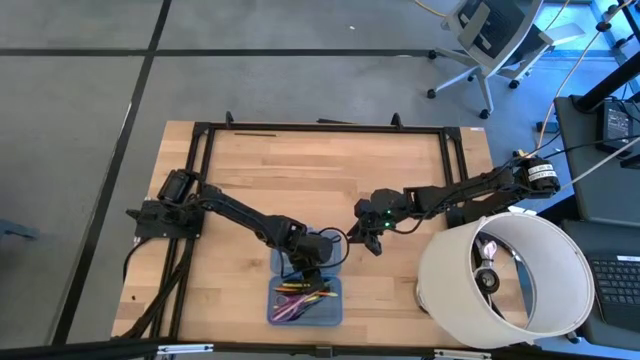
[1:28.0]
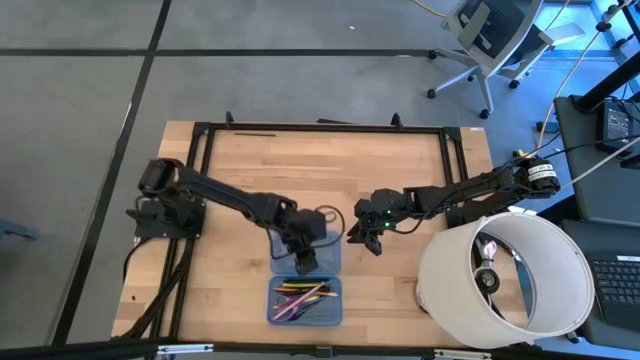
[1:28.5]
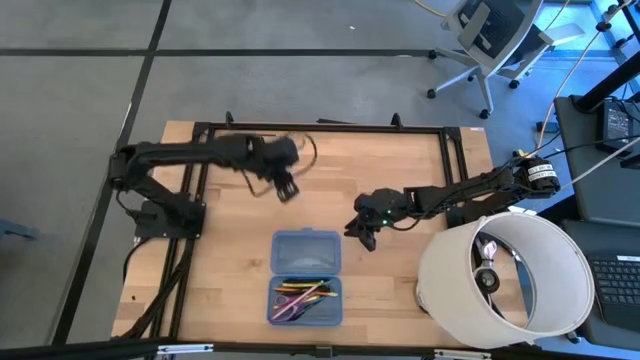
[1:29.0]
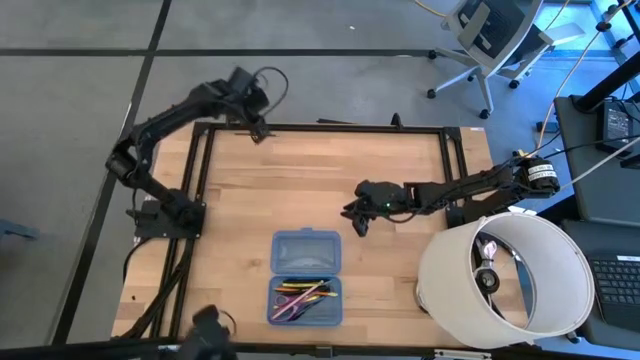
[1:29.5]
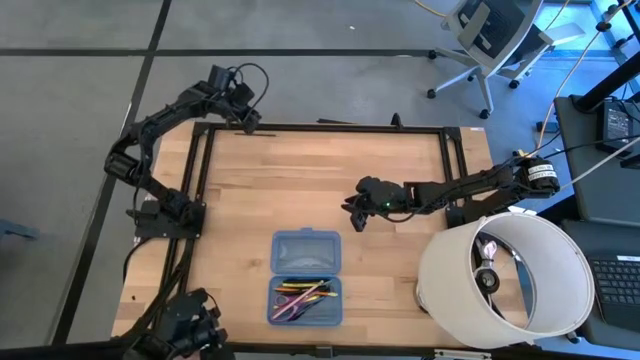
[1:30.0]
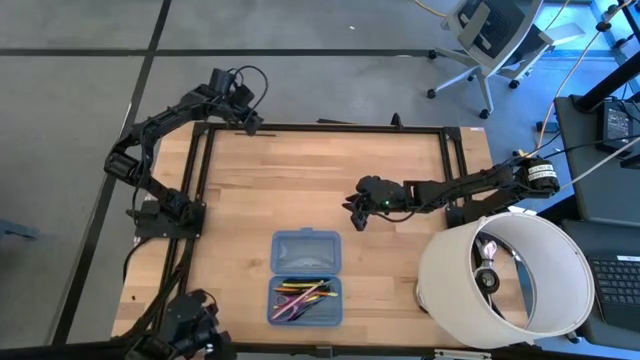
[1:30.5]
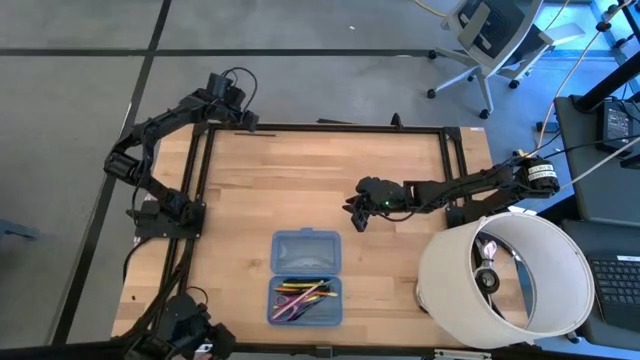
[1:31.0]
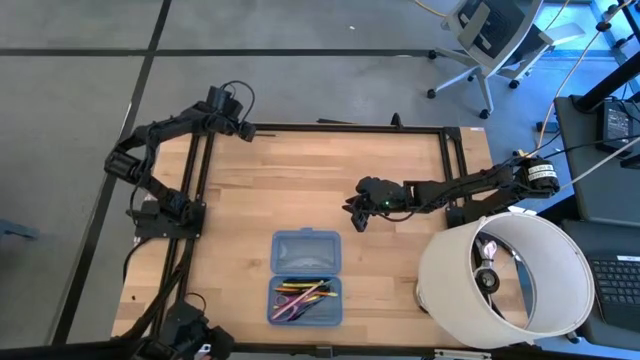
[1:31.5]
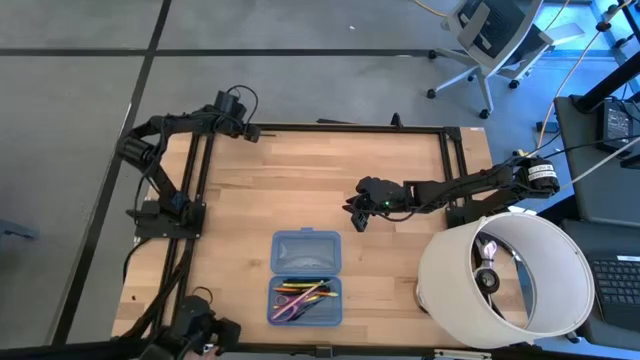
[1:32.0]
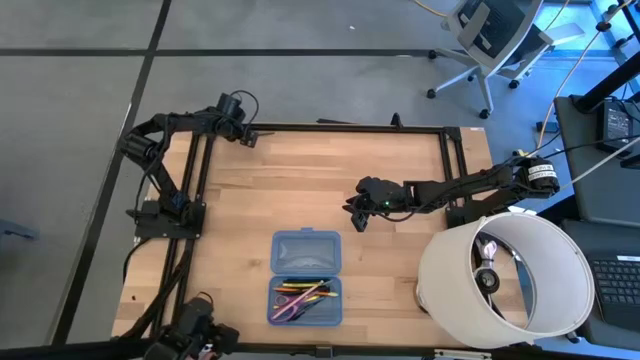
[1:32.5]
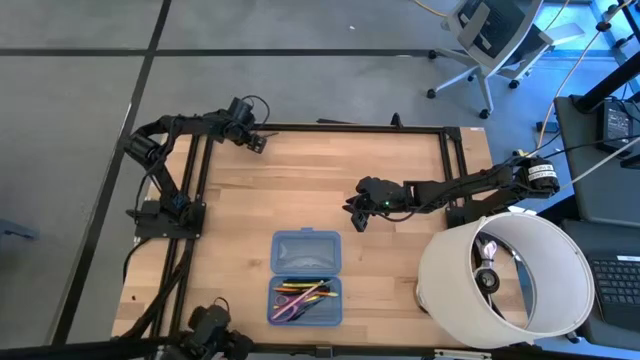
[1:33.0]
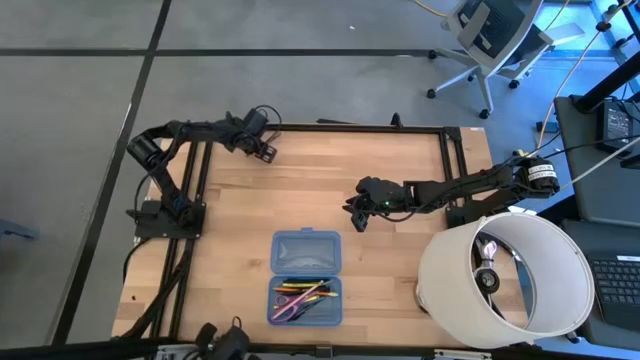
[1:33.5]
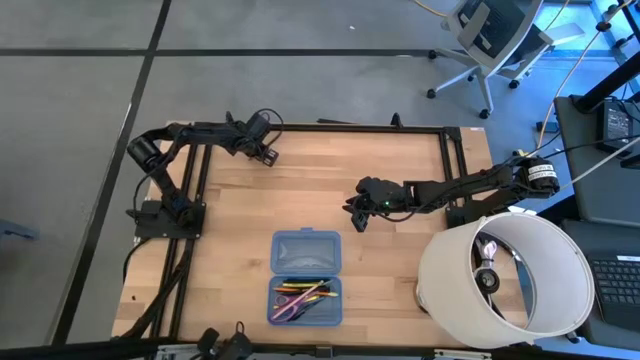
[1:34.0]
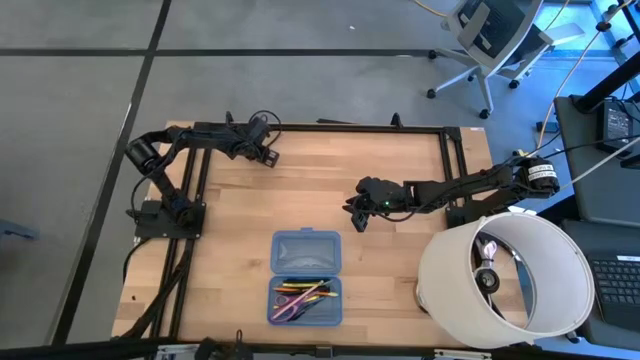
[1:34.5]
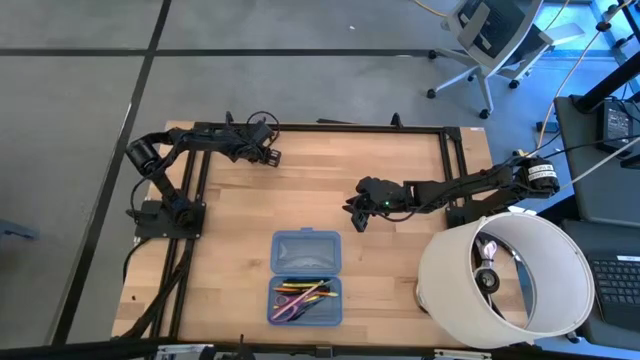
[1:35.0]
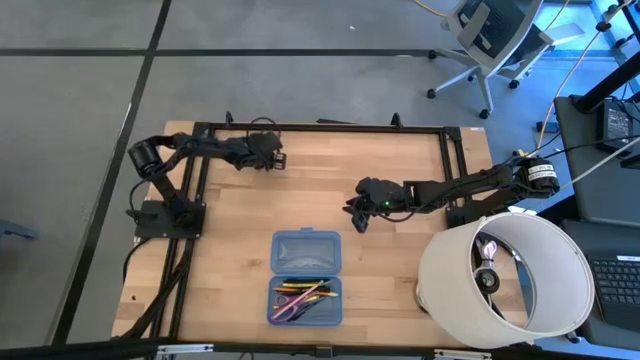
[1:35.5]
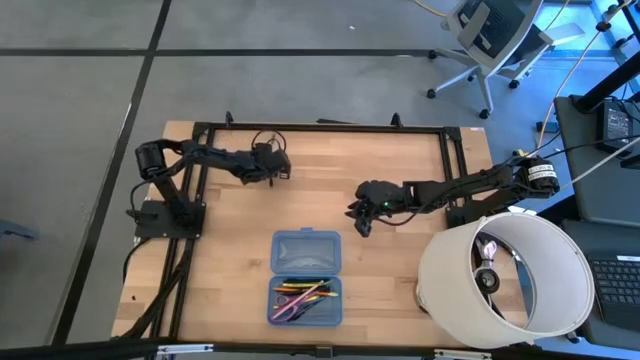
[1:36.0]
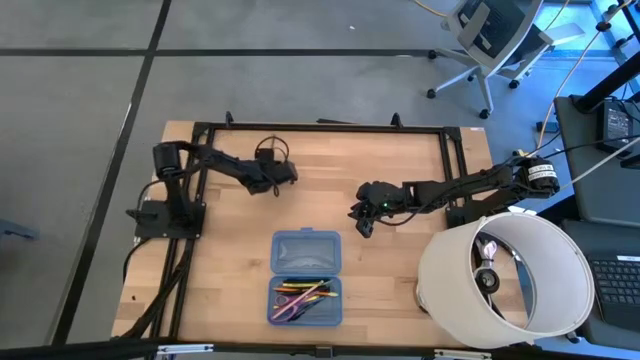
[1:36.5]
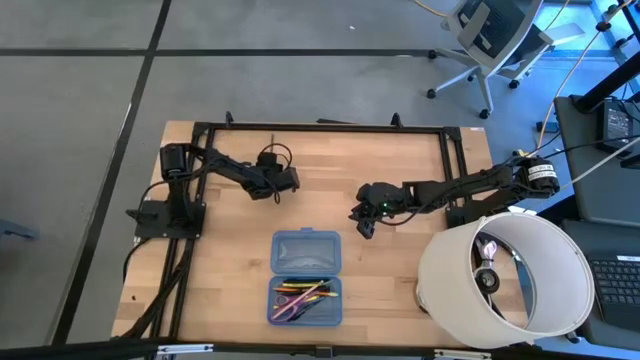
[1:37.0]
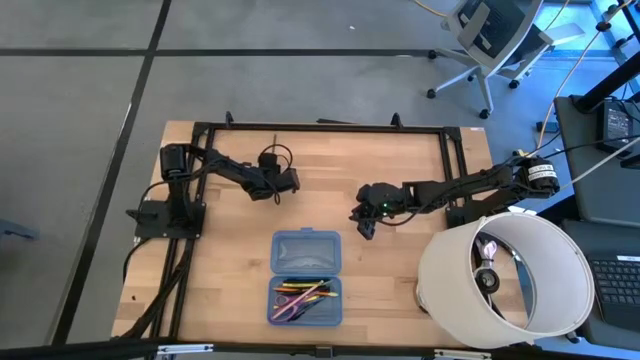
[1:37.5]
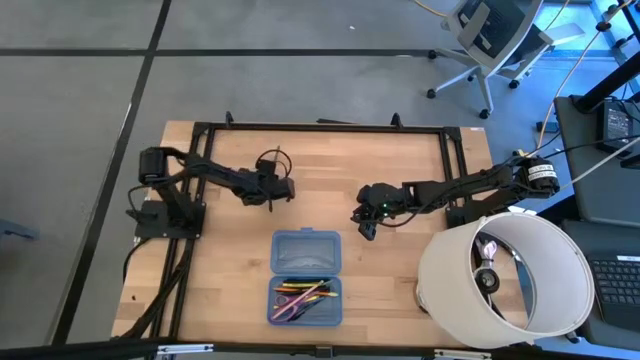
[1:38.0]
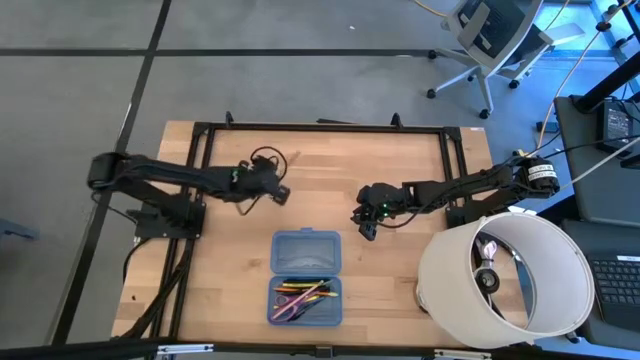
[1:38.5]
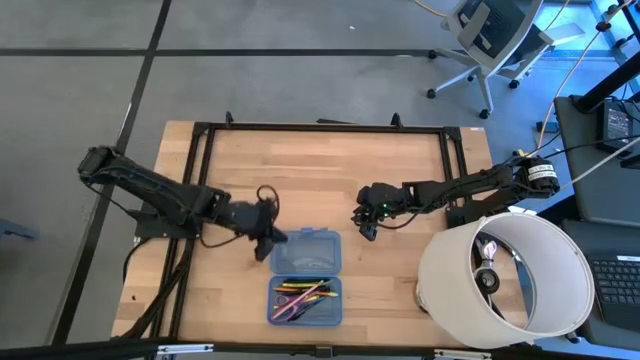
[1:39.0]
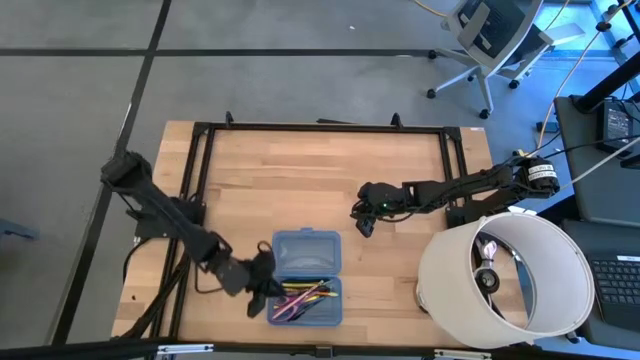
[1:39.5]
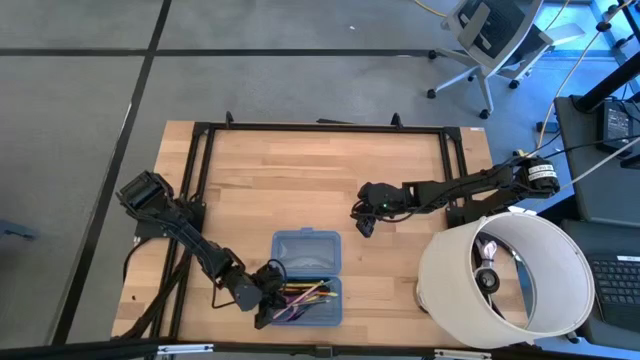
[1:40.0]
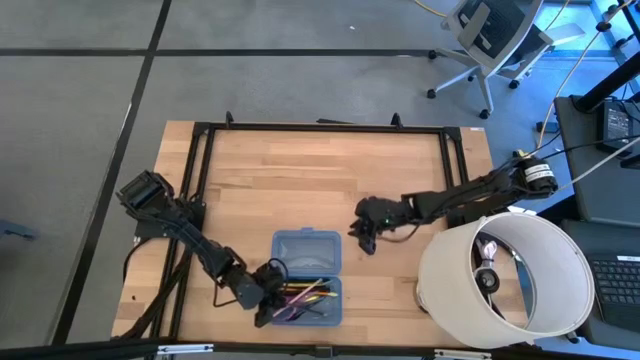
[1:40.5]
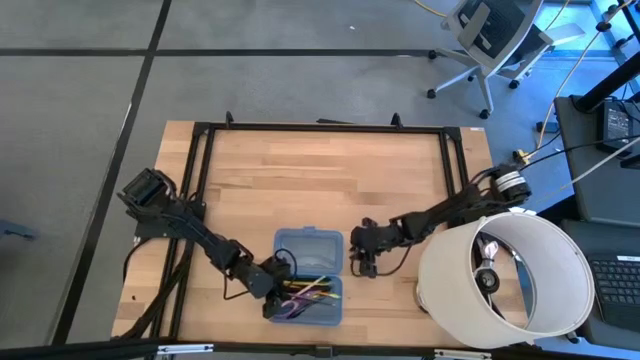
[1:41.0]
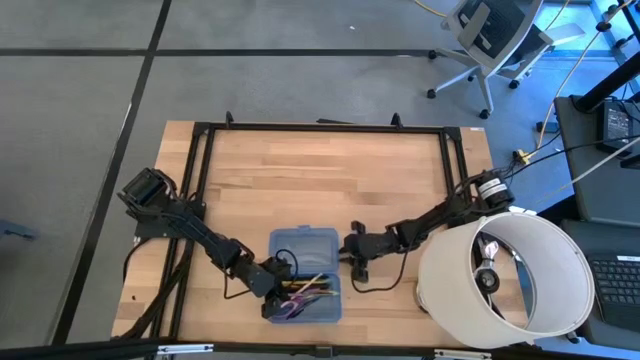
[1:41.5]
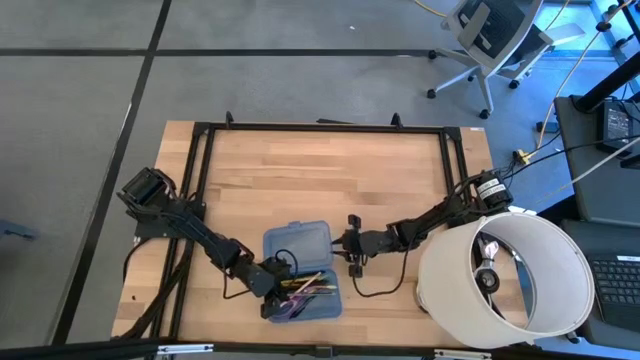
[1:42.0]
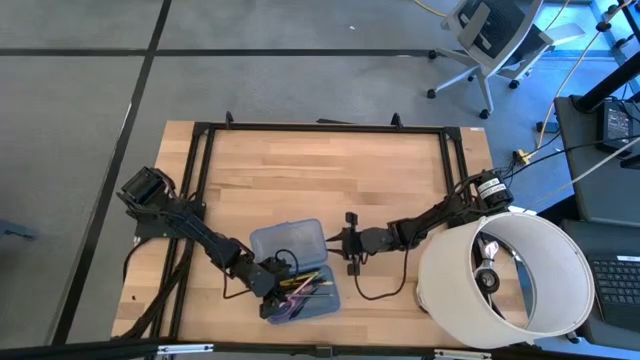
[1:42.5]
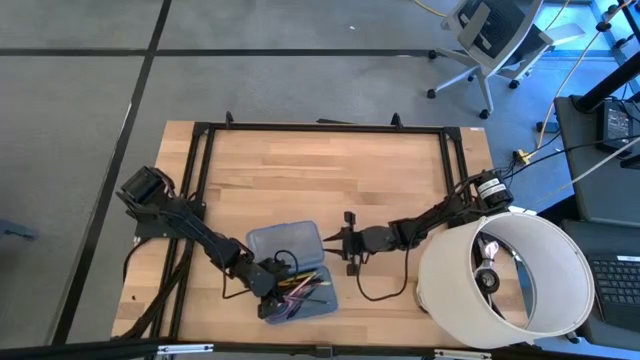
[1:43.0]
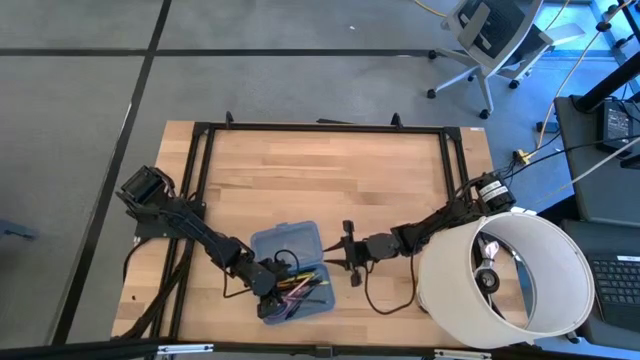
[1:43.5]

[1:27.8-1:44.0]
Task: Pick & place school supplies into a supply box
Put the black pencil into the blue supply box

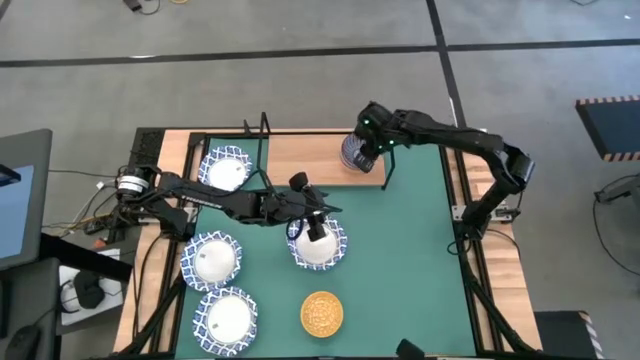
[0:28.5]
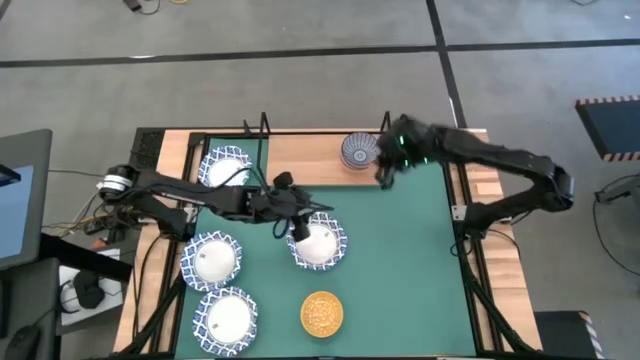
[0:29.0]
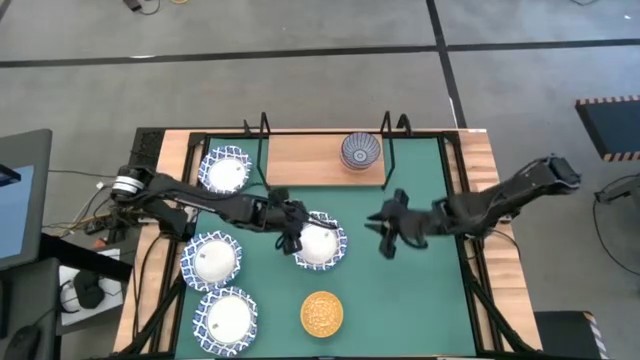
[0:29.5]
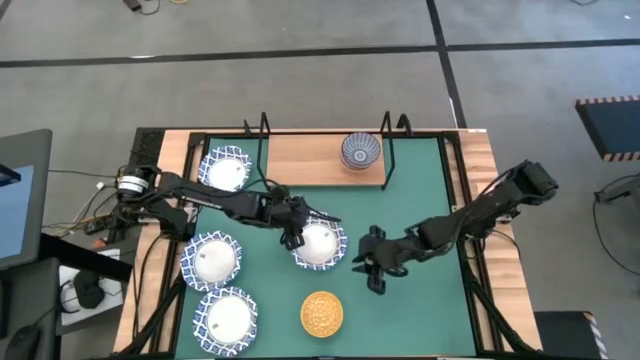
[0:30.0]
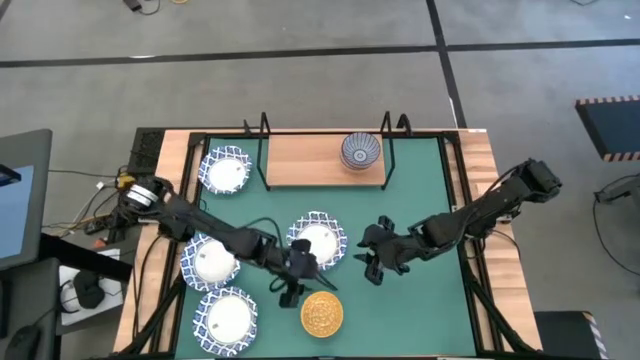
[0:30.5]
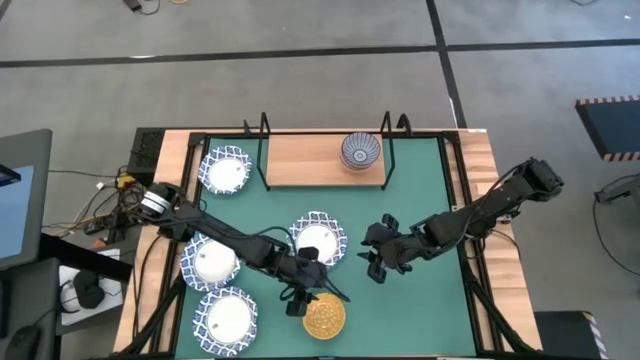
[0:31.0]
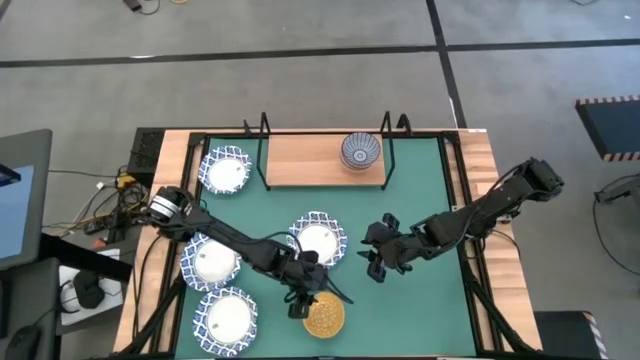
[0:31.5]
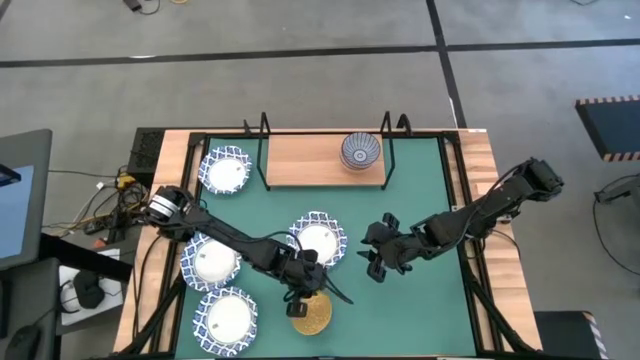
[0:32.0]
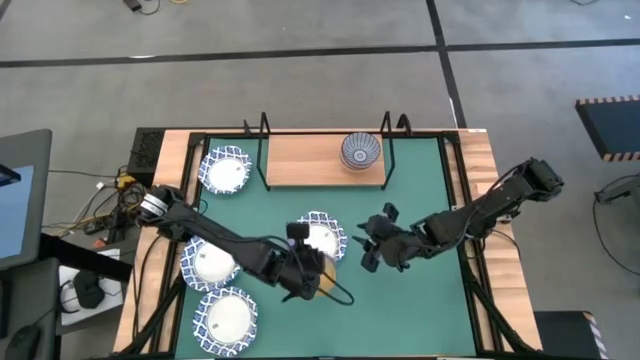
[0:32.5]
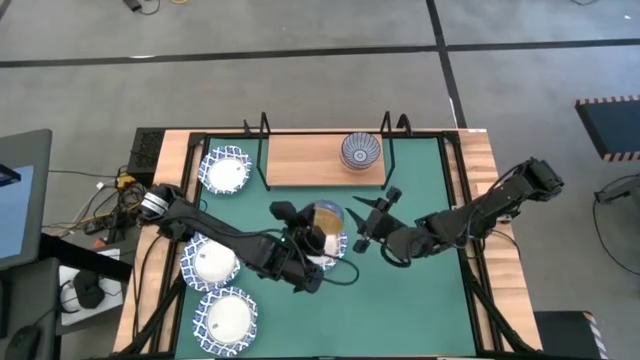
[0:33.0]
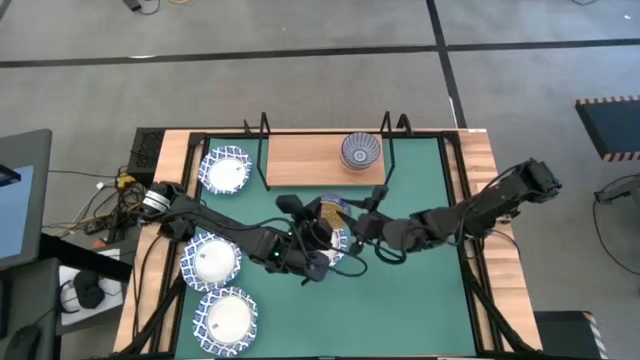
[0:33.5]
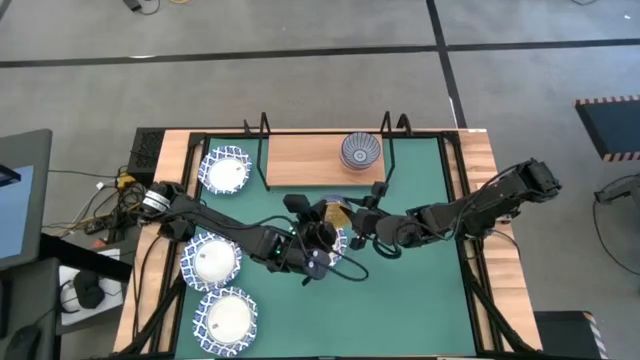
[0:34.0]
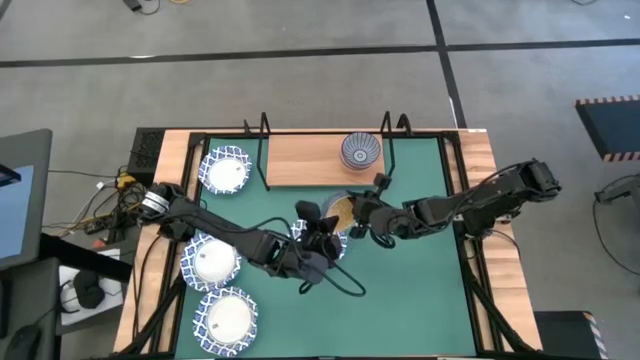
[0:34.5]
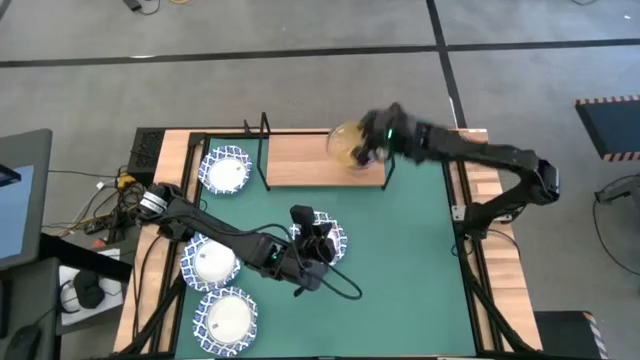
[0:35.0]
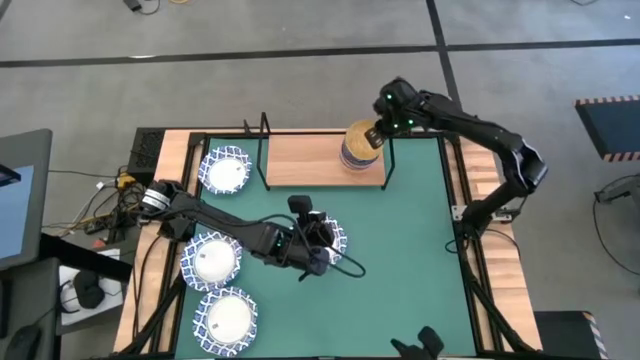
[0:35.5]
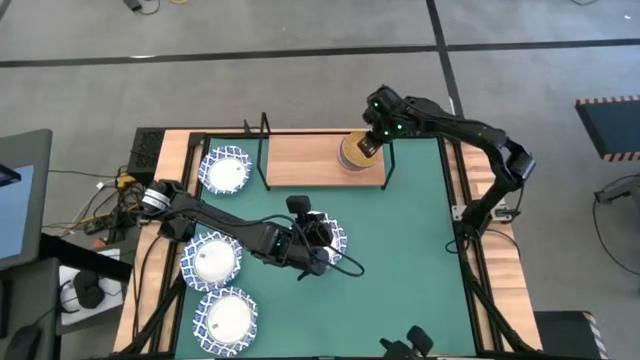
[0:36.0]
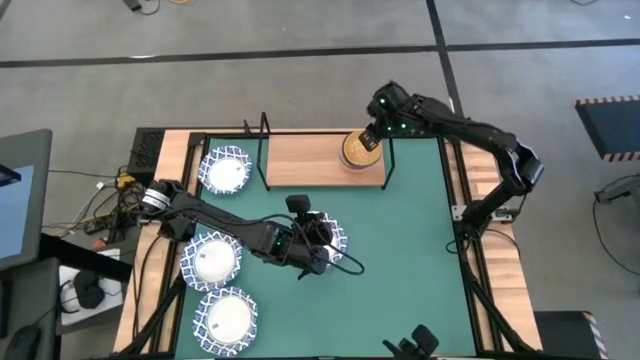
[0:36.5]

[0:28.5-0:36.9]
Task: Place and stack bowls onto a shelf
Stack the yellow patterned bowl on top of the blue patterned bowl
